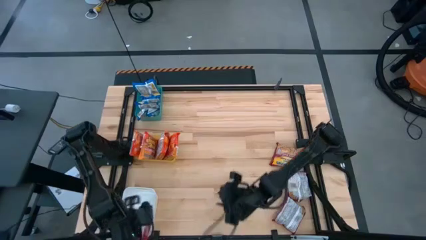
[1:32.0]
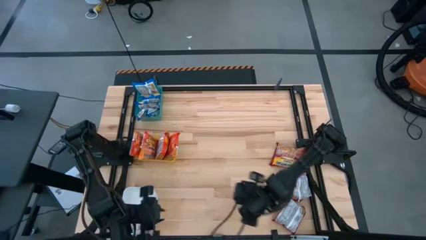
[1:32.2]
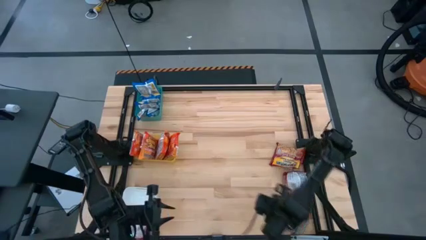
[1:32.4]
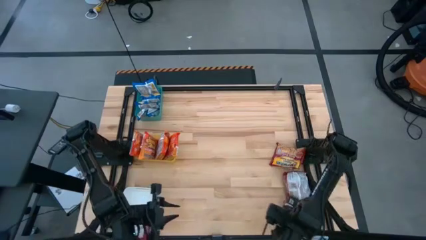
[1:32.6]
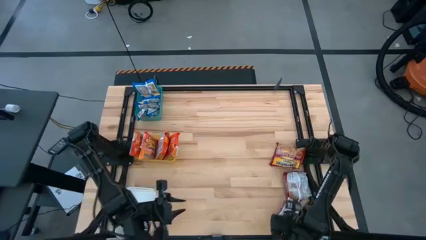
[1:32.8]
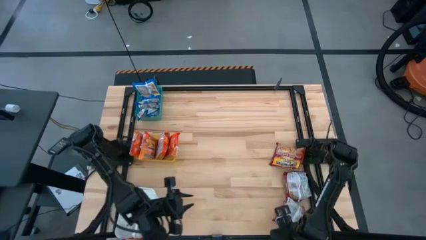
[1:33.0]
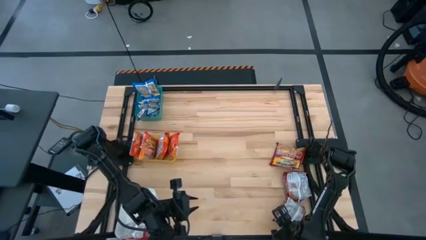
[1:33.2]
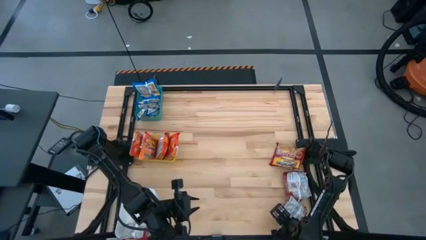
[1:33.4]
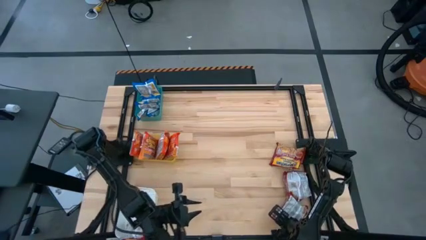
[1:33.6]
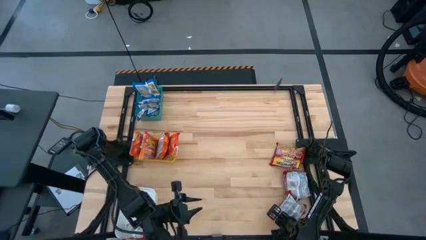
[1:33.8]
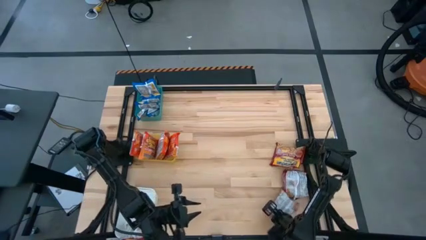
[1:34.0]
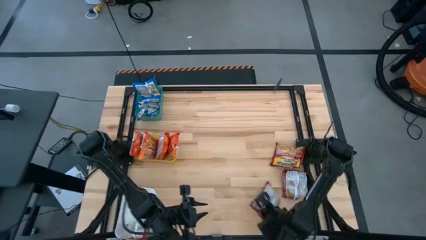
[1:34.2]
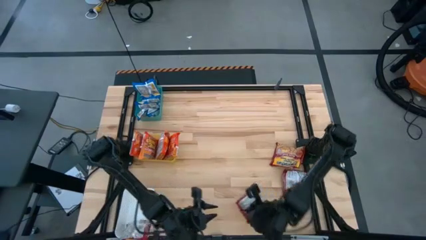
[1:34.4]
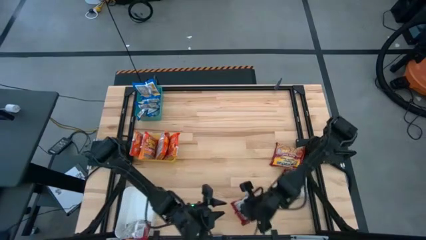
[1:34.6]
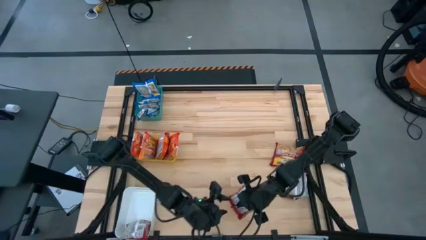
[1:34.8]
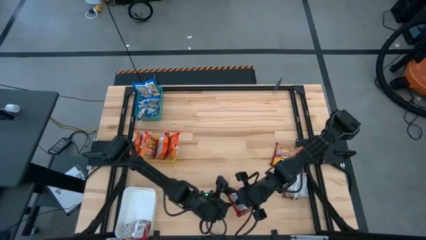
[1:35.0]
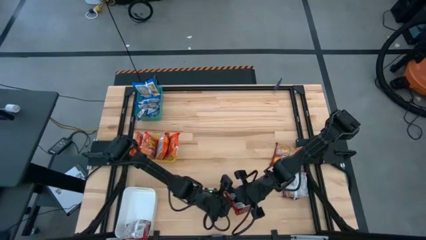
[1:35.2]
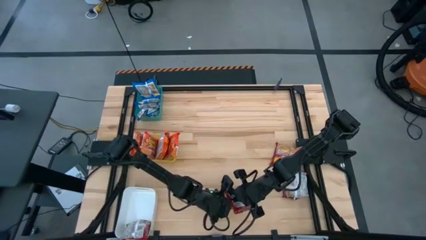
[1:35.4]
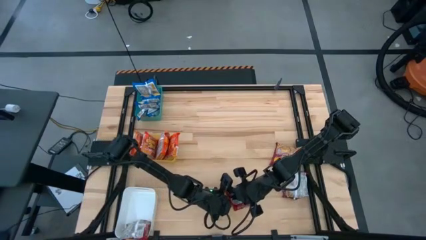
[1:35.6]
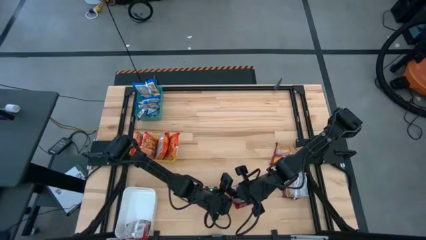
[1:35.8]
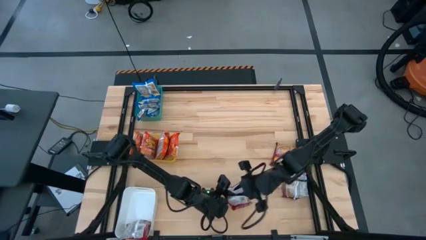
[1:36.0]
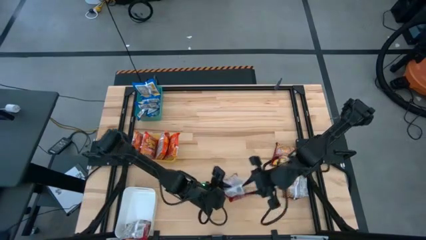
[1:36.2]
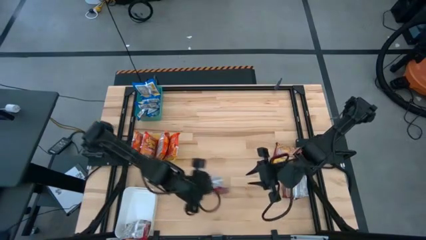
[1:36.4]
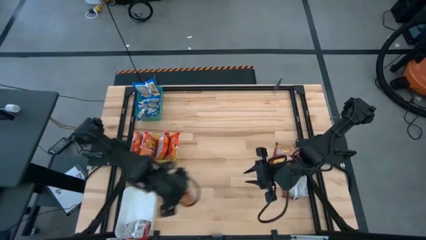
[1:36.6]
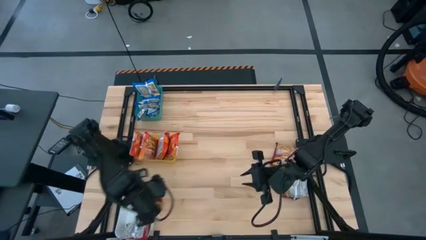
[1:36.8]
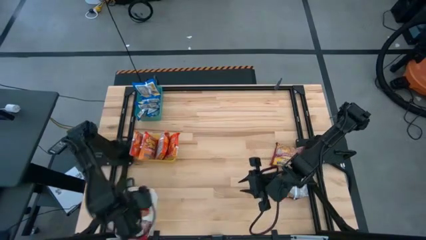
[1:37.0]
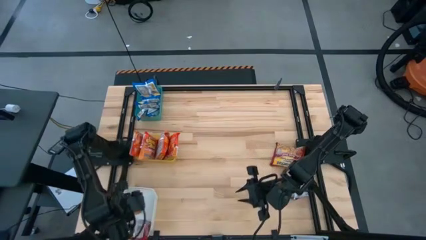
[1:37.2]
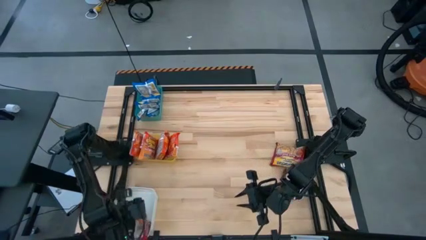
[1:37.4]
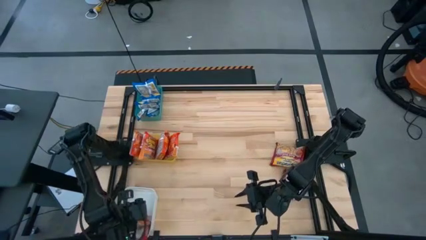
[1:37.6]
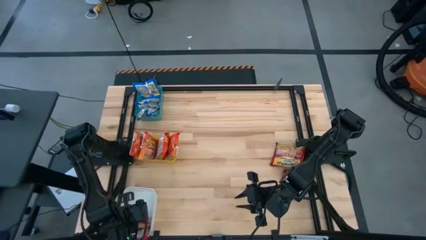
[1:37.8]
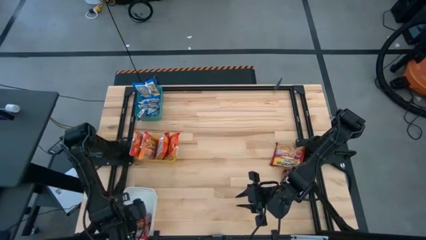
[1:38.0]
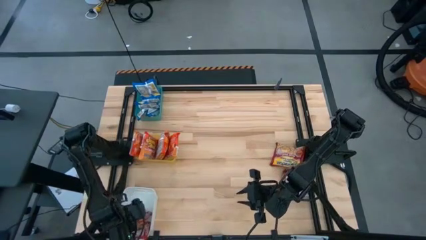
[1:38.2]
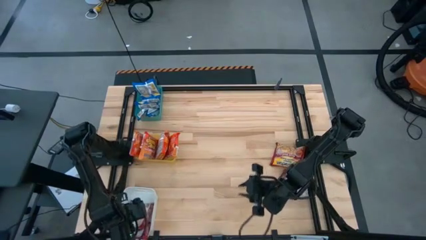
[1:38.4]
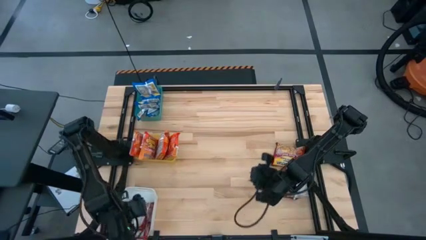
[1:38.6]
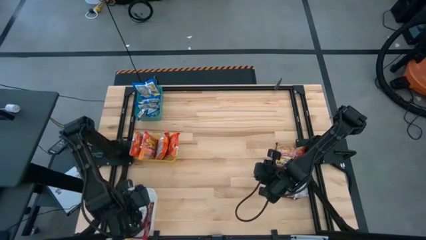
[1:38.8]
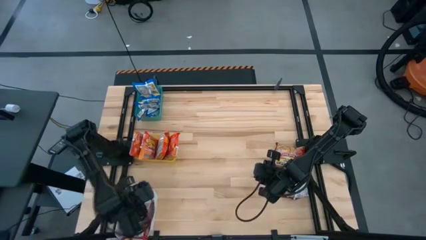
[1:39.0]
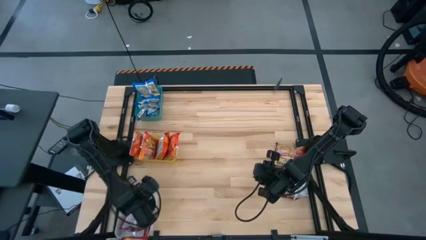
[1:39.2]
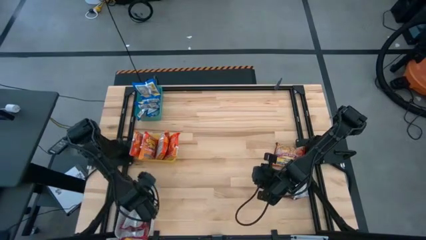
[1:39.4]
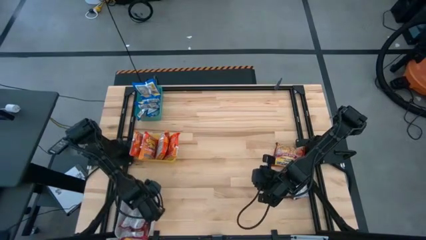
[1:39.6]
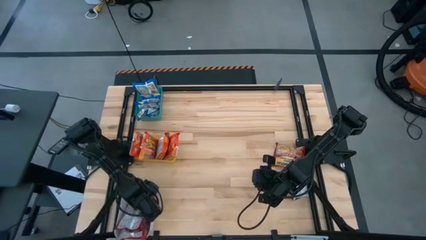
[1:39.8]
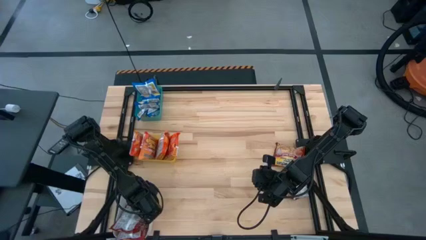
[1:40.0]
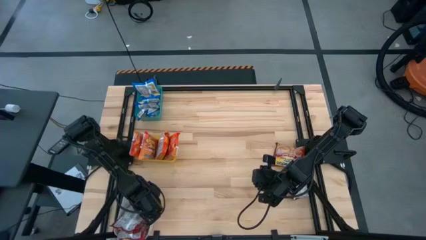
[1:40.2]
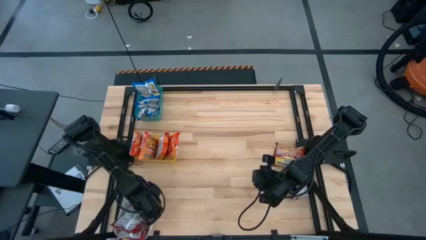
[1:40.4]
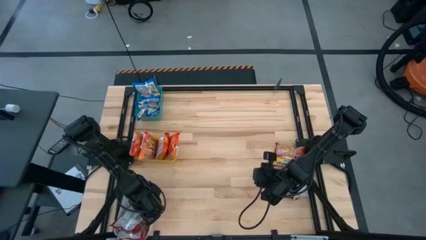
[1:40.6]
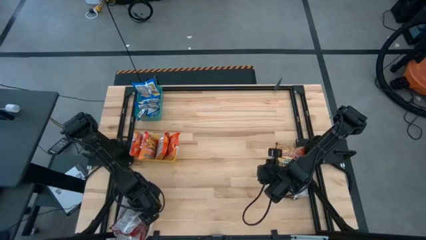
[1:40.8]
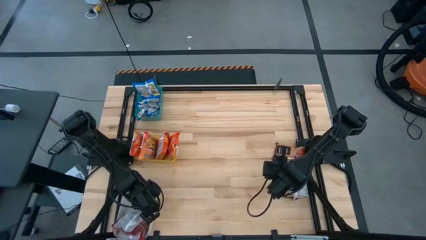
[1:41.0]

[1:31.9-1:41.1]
Task: Sort Maruchan noodles
Put the red noodle pack into the white bin

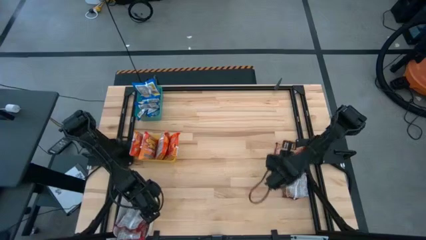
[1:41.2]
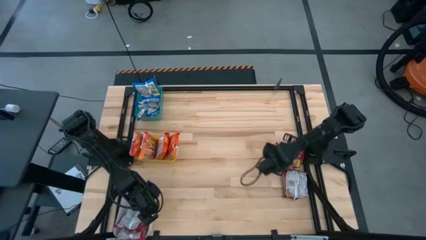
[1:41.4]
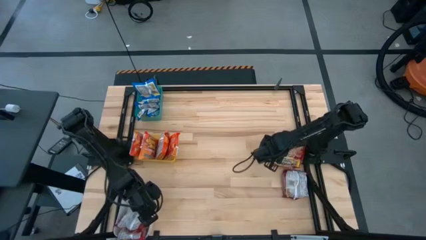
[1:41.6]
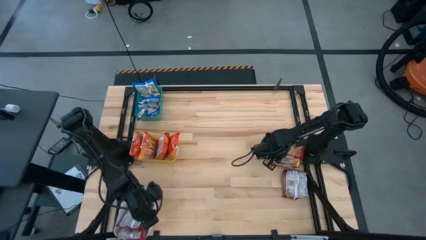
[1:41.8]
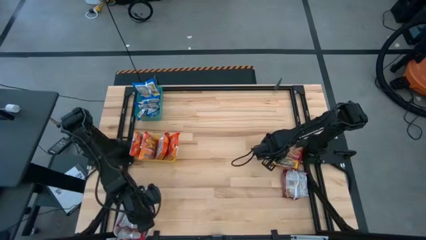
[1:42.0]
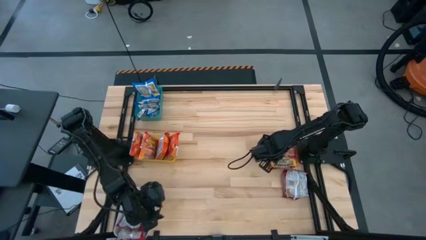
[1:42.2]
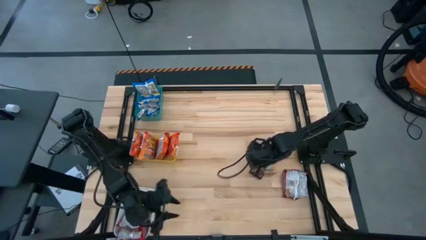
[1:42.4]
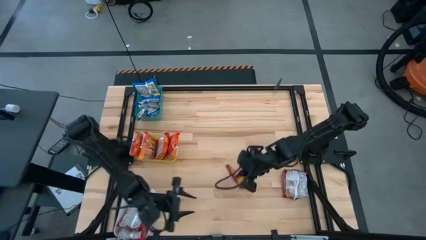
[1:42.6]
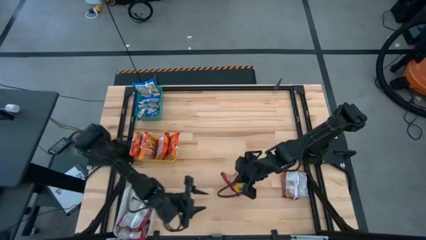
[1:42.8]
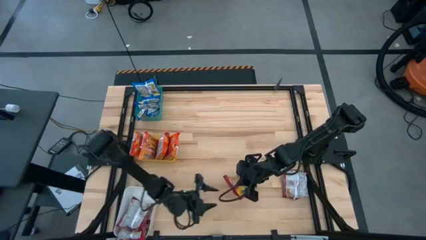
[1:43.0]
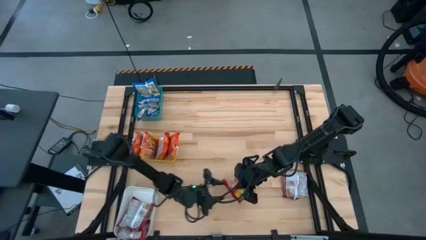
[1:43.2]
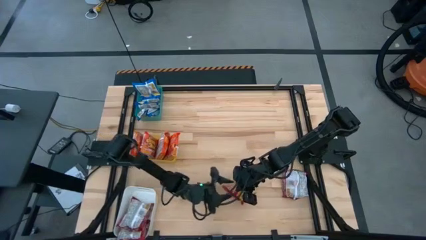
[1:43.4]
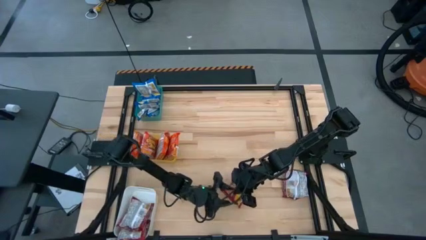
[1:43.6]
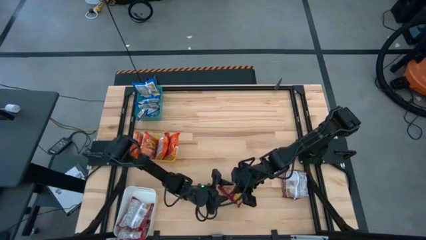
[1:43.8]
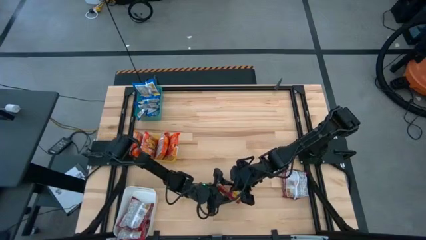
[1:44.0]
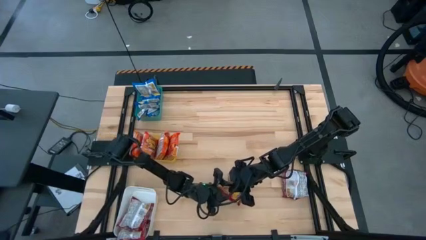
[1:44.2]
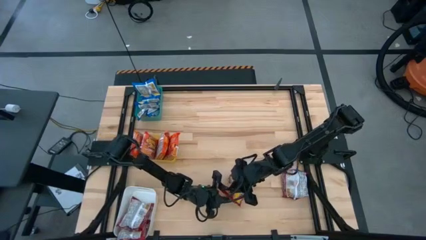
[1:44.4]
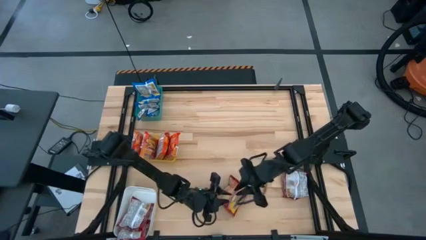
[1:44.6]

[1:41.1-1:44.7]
Put the red noodle pack into the white bin

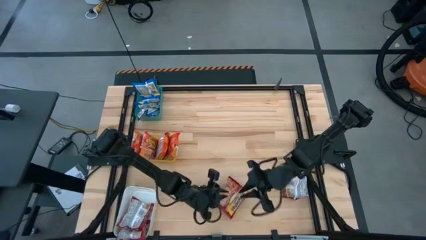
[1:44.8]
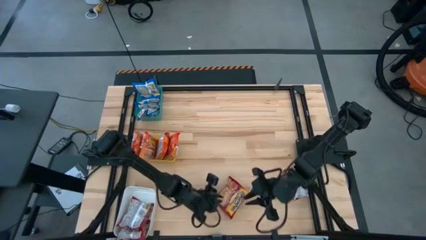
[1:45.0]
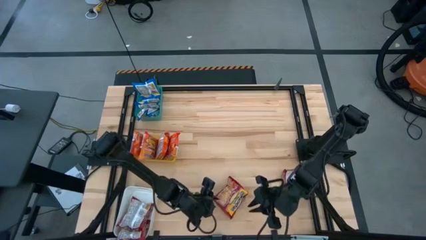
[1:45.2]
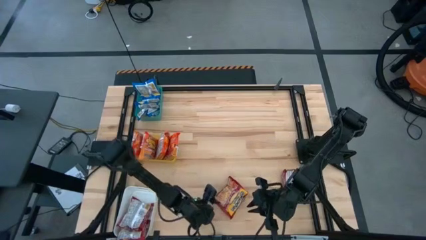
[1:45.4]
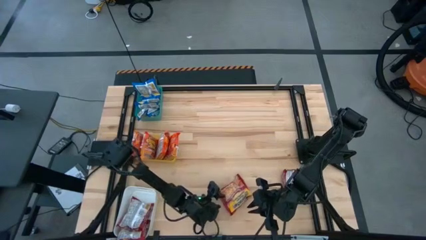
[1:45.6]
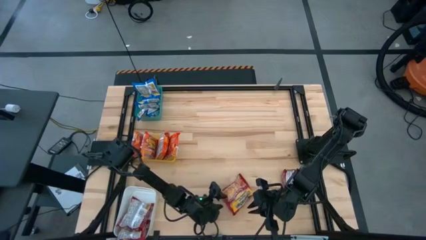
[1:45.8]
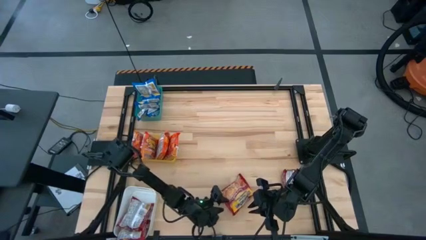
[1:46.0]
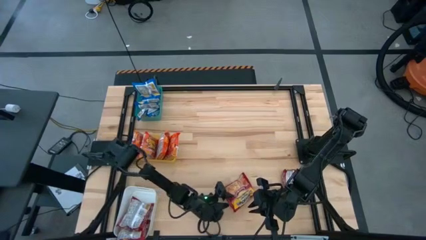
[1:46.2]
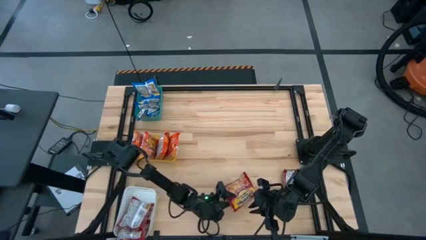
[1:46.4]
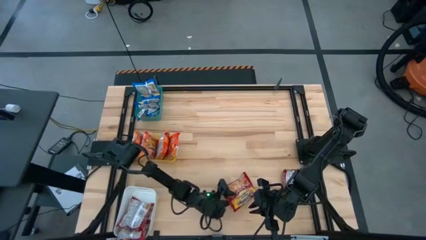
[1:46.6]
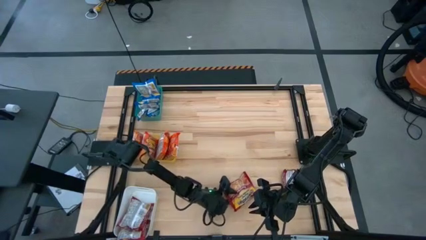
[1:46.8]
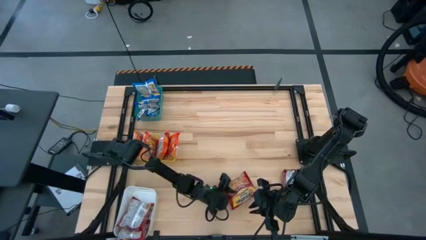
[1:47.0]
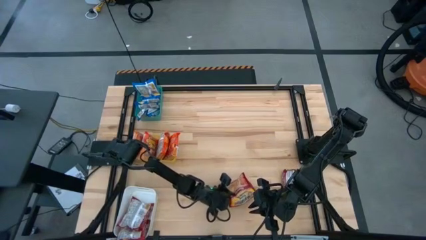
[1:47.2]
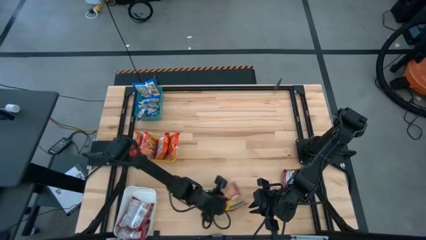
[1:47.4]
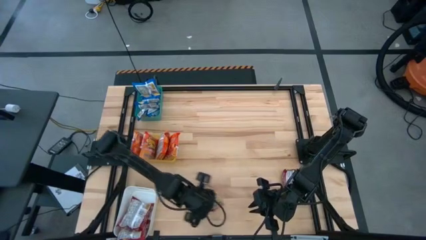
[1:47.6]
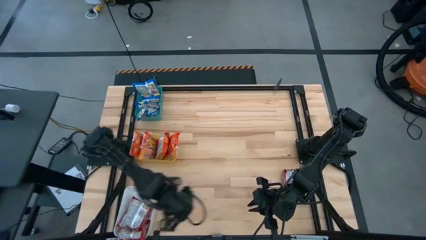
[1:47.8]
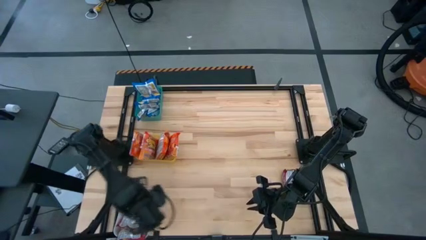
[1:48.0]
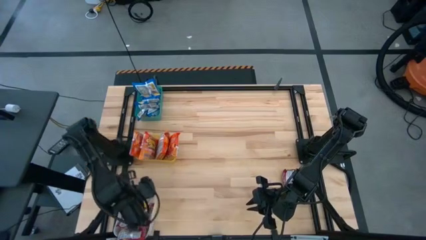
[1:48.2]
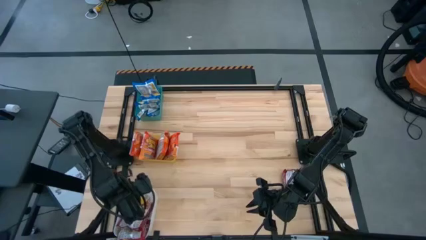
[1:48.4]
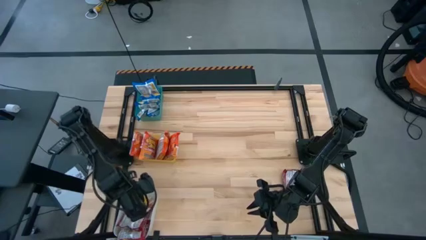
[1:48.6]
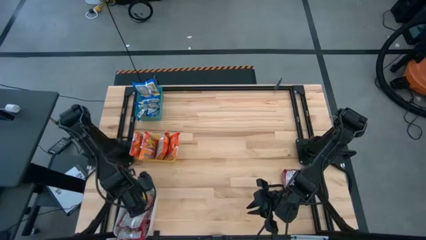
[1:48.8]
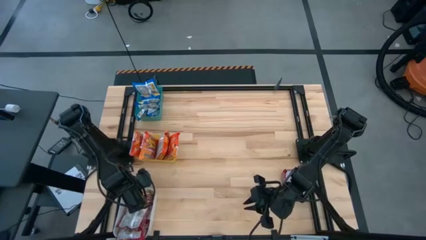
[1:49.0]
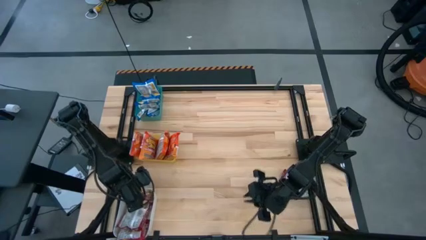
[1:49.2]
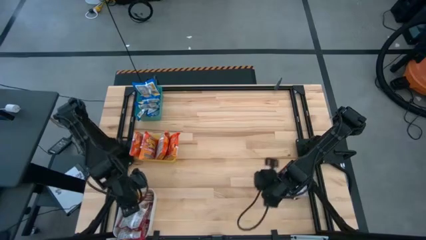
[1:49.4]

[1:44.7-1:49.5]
Put the red noodle pack into the white bin
